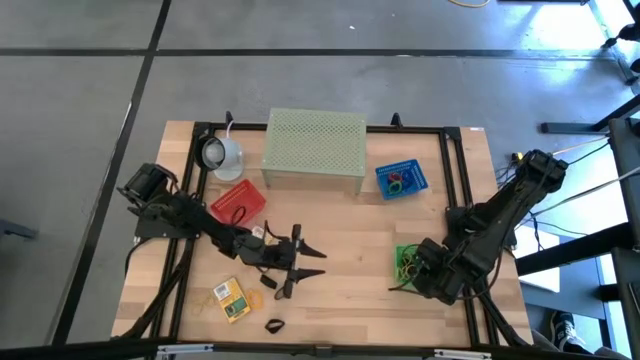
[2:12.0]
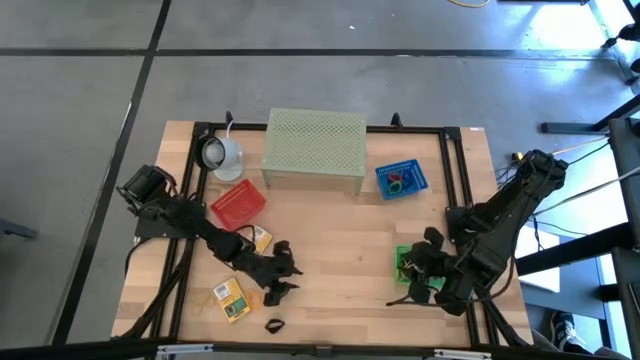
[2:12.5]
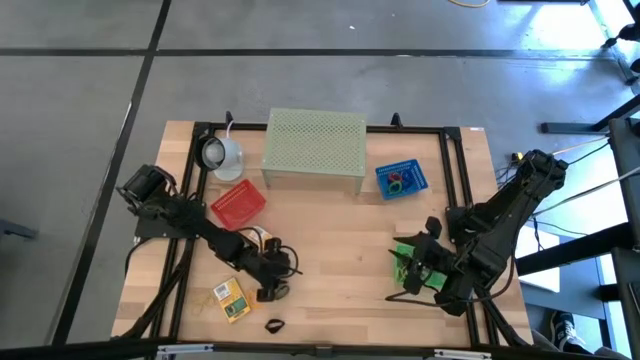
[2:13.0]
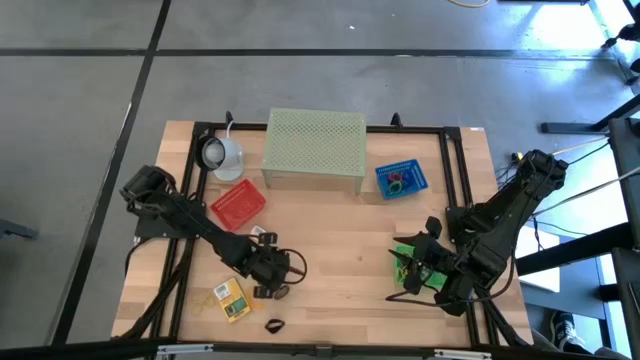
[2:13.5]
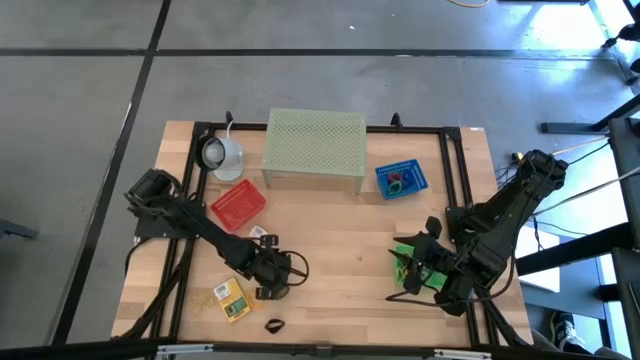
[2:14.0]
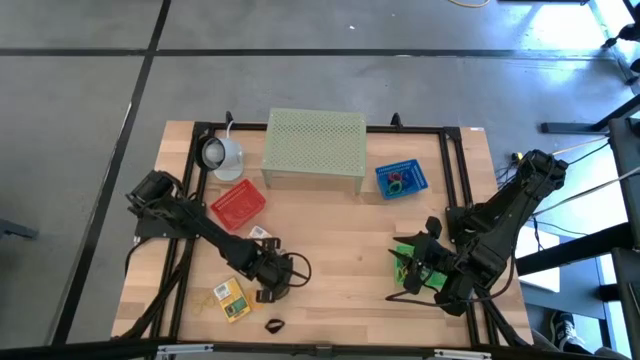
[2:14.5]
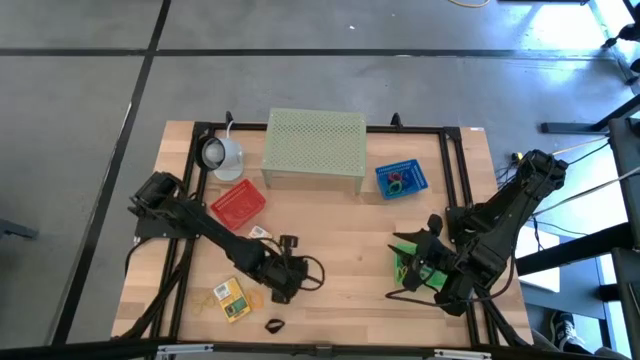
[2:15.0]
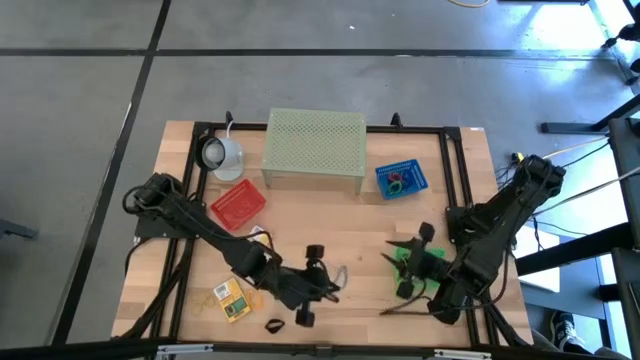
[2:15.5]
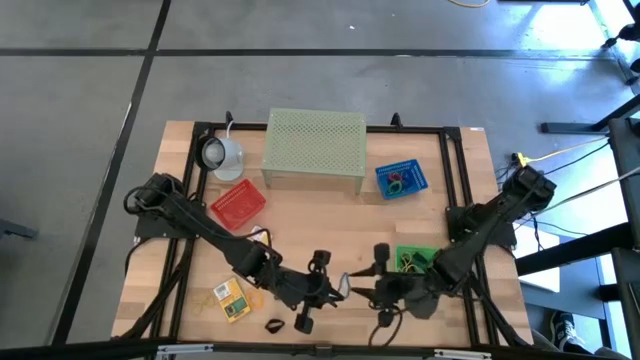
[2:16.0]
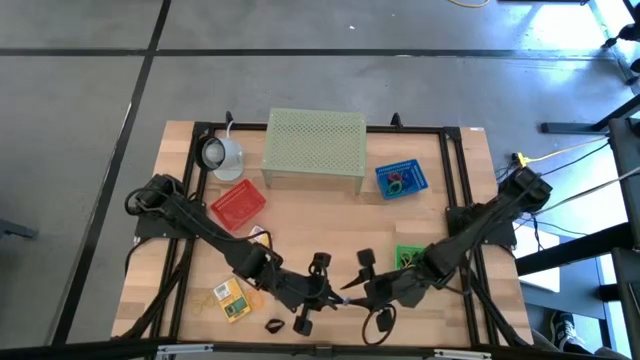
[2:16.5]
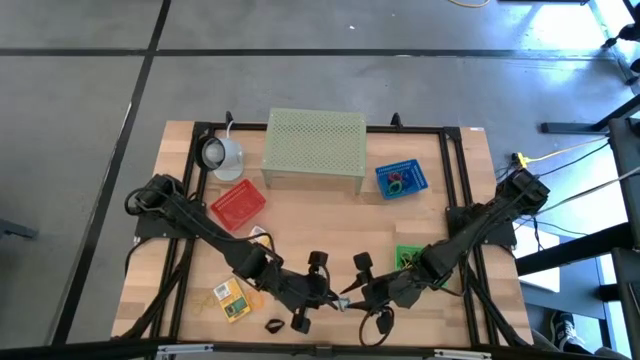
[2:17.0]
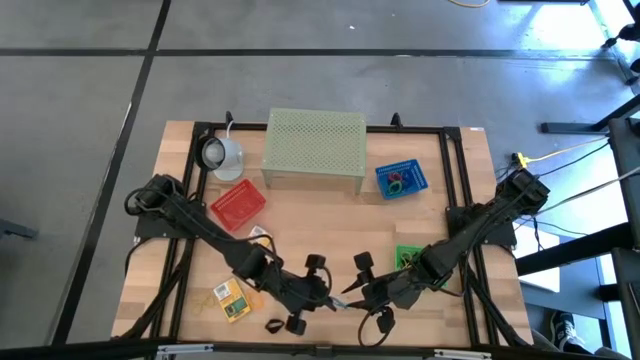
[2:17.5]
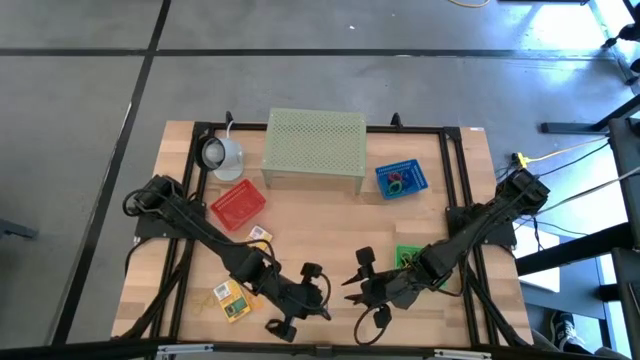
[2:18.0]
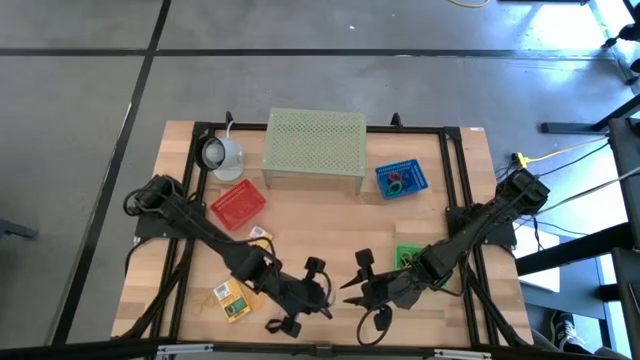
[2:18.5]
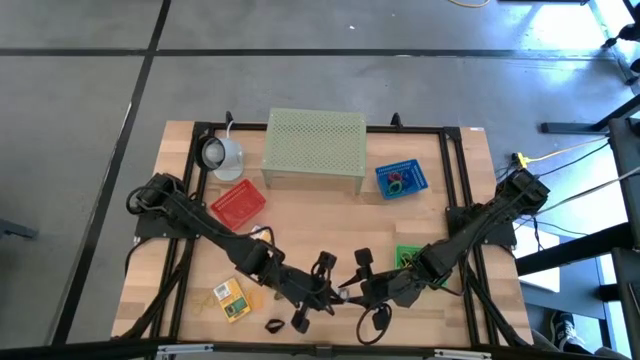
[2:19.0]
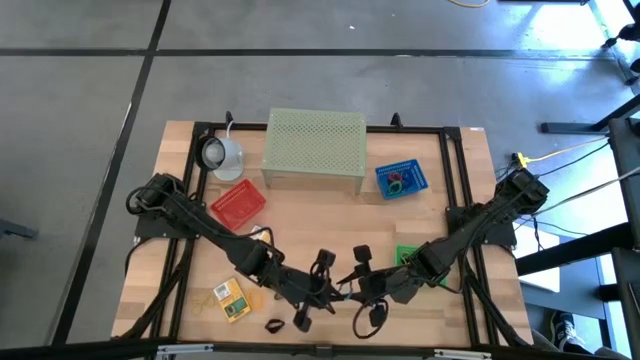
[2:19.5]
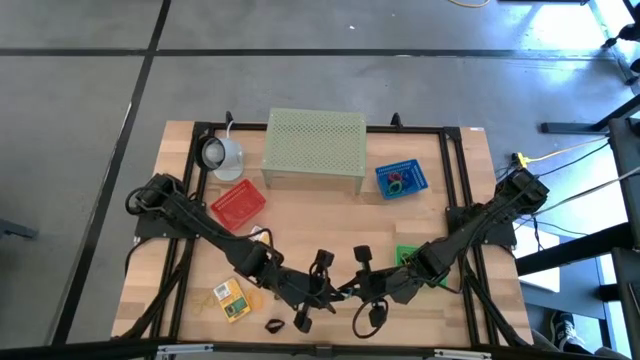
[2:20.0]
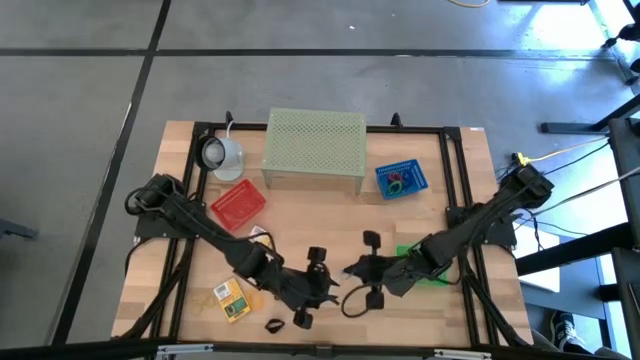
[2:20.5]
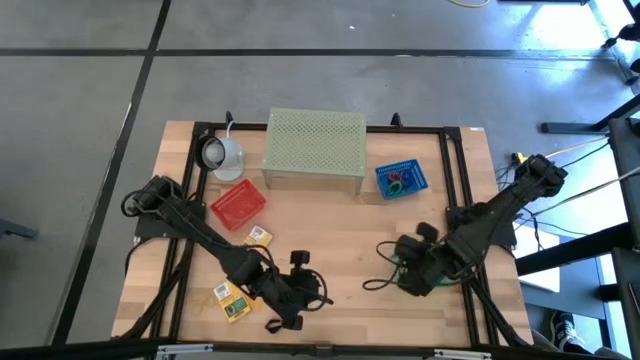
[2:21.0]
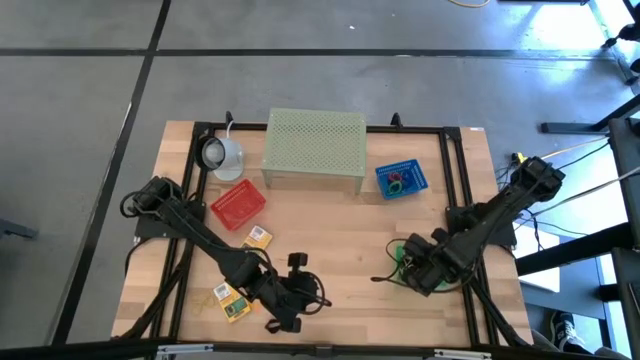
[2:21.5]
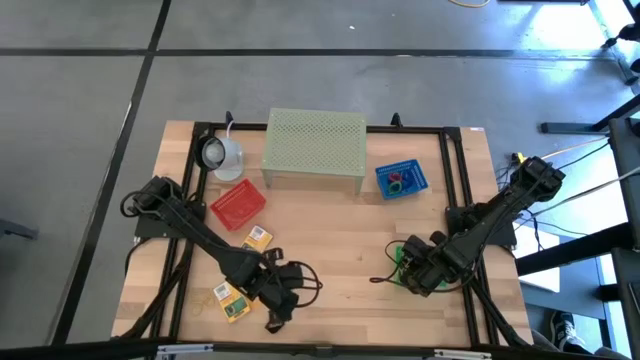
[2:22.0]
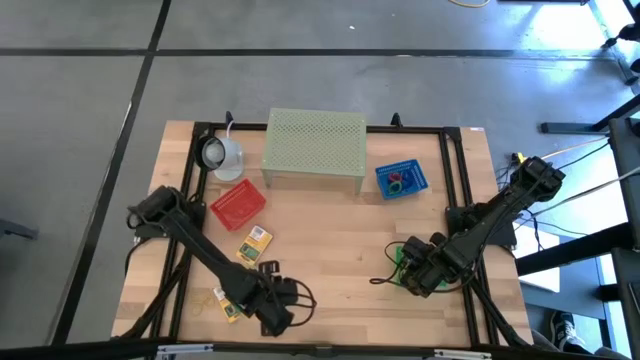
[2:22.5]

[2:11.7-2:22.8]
Task: Pick & Place Office Desk Supplies
Put the blue rubber band into the green bin

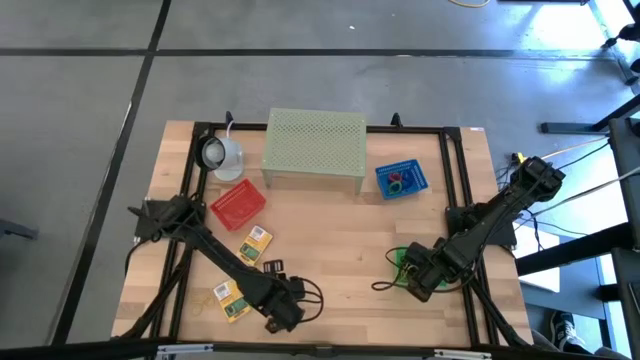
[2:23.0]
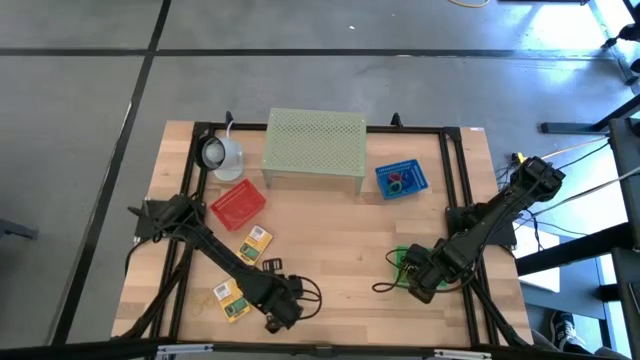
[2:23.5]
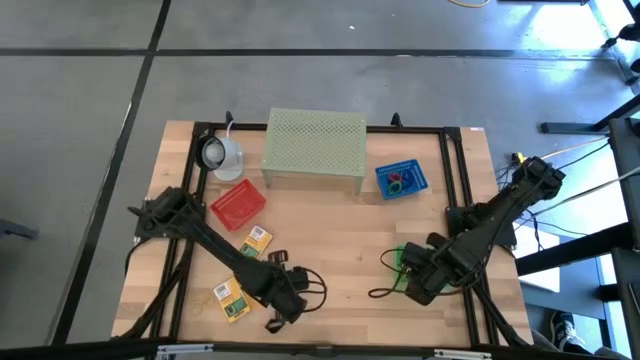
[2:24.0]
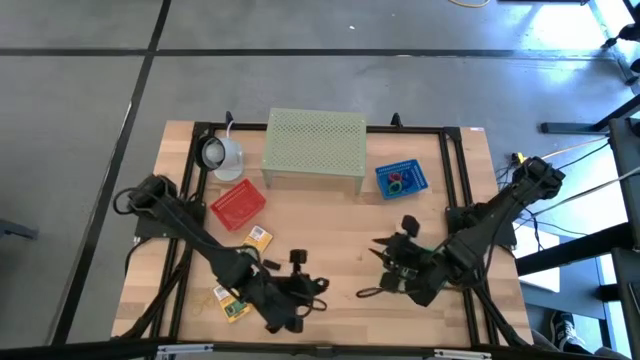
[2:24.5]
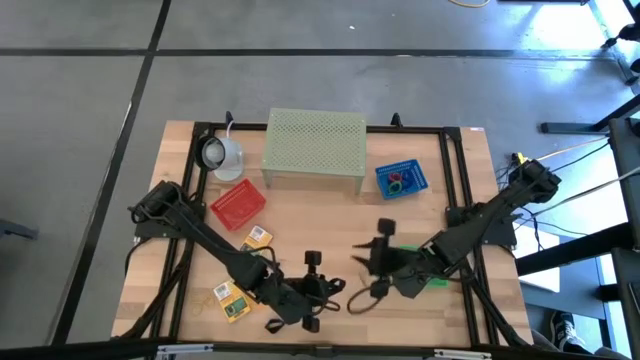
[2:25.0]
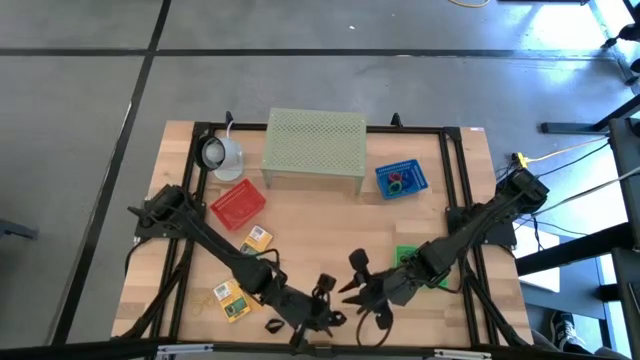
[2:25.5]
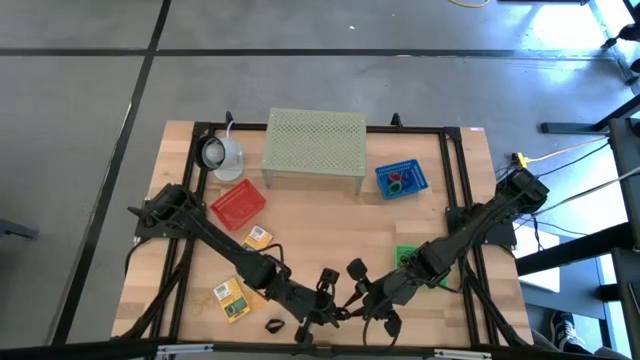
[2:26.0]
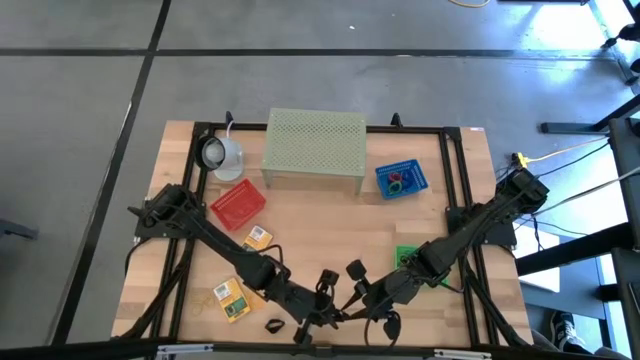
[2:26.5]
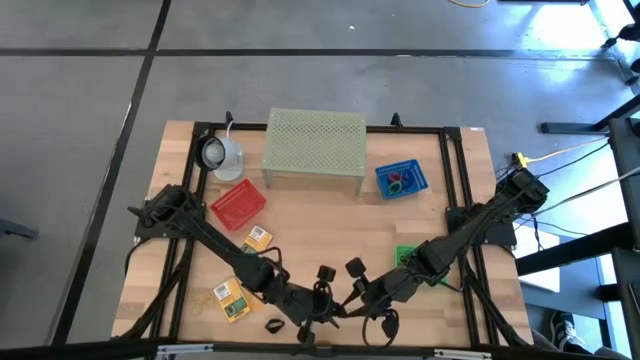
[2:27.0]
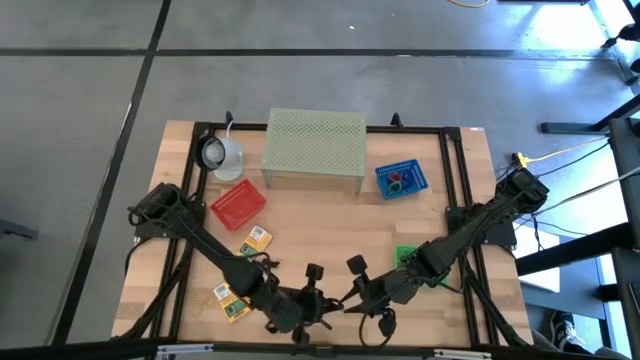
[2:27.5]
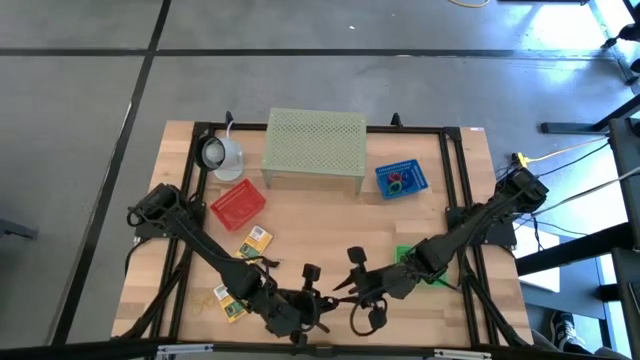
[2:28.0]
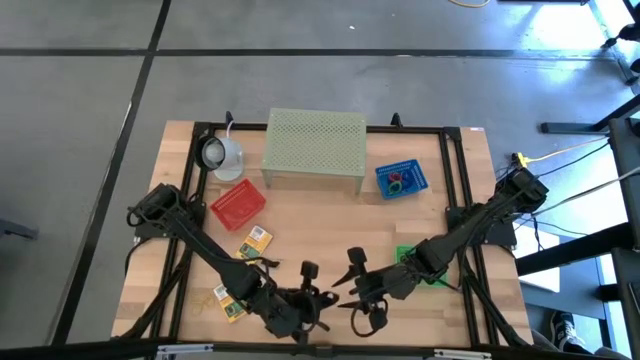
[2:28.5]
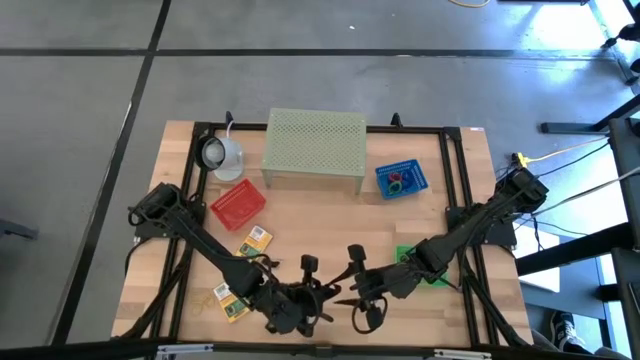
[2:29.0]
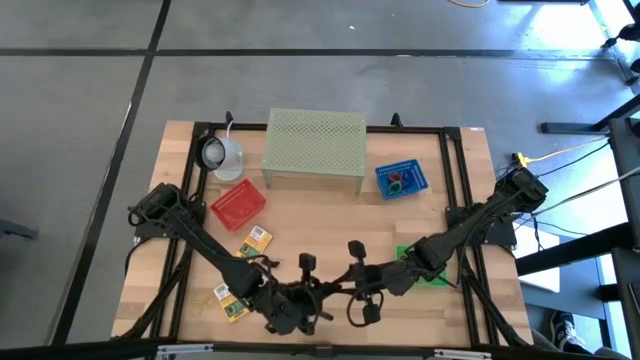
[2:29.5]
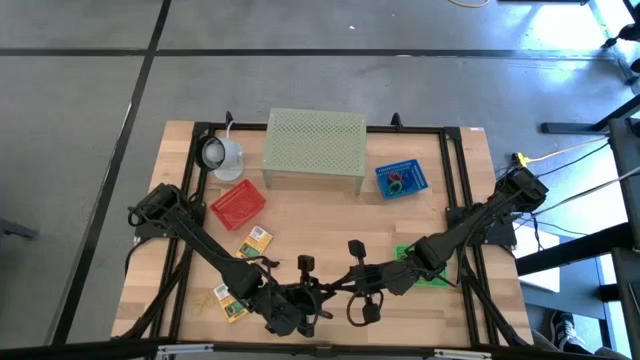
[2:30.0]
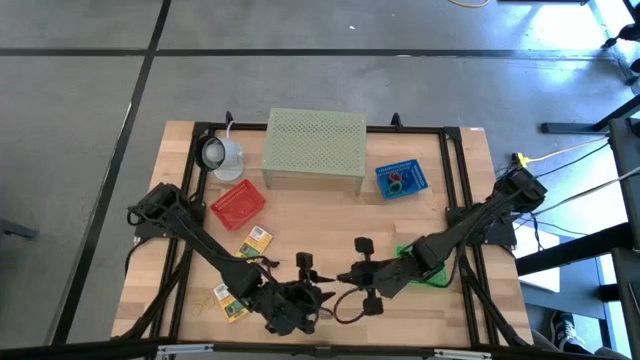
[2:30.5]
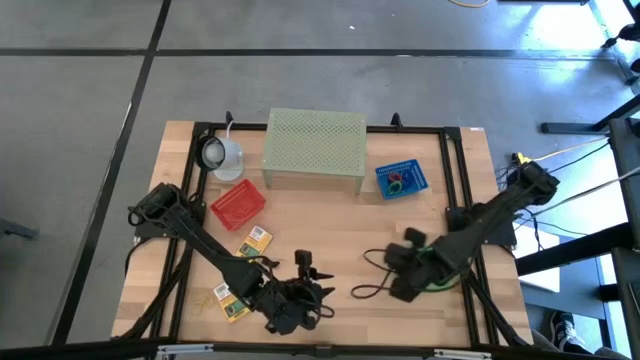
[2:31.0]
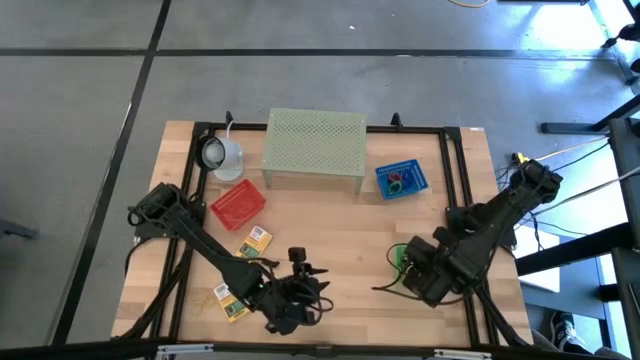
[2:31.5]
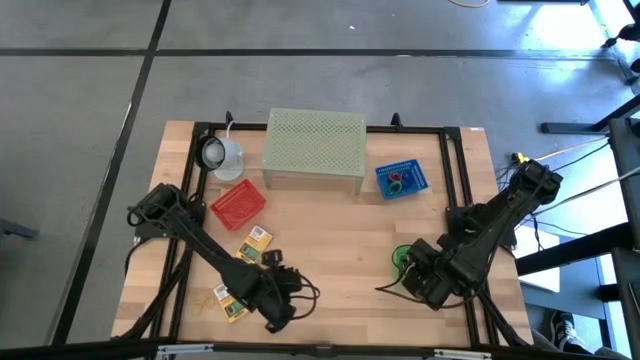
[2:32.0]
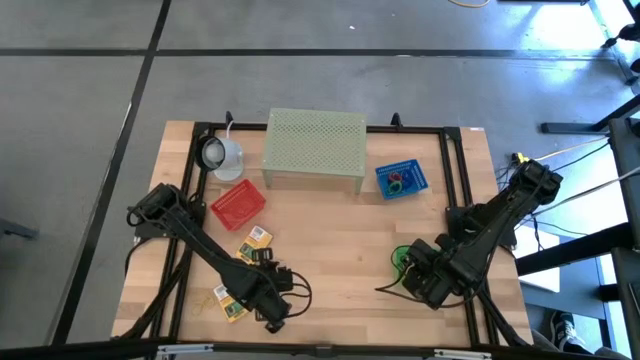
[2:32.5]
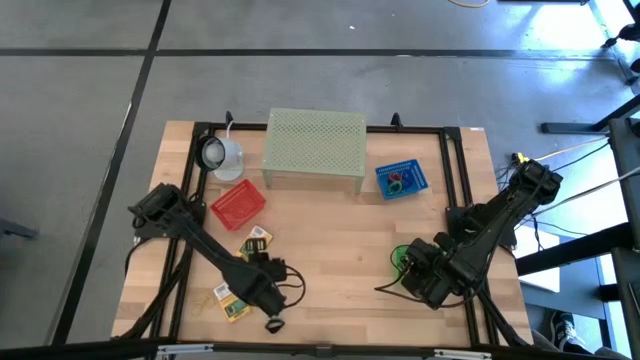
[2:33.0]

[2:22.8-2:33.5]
Put the black rubber band into the green bin
